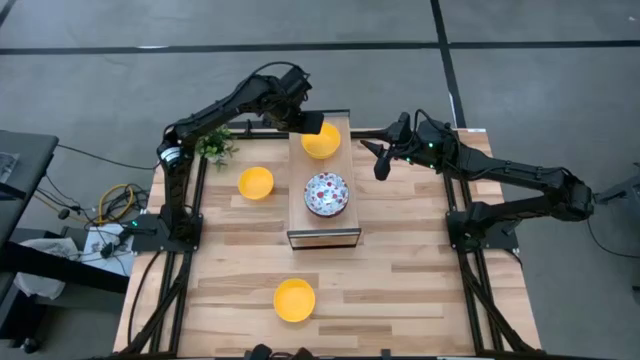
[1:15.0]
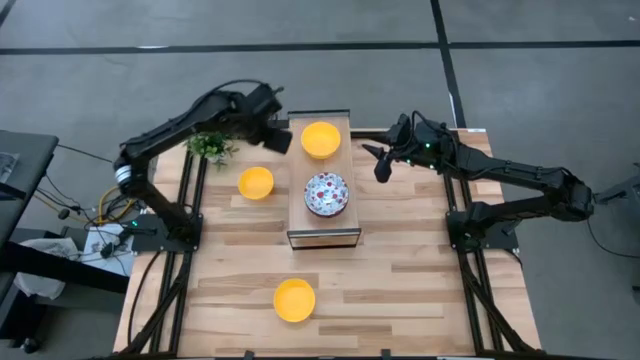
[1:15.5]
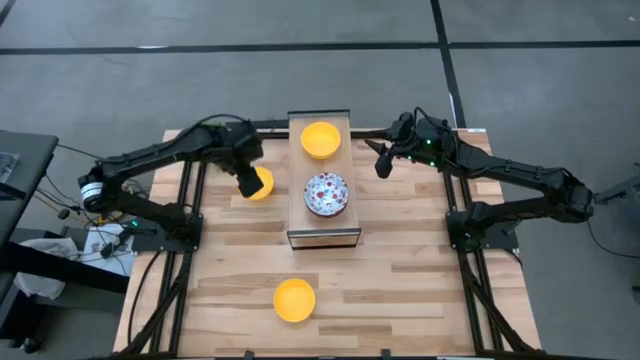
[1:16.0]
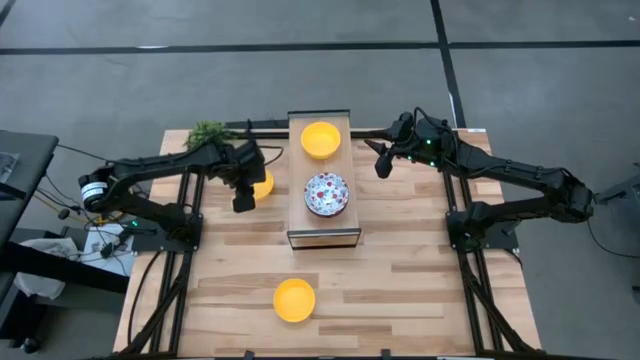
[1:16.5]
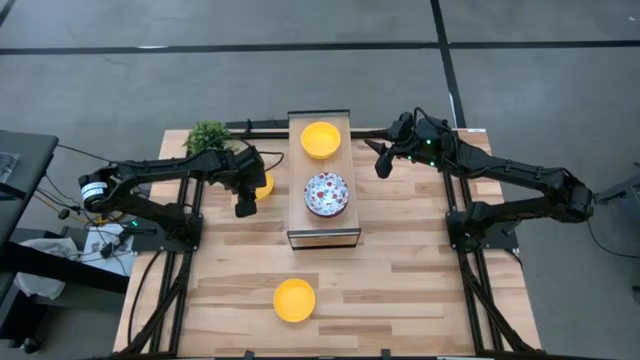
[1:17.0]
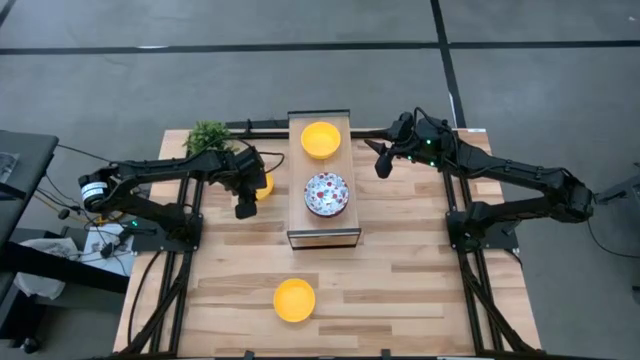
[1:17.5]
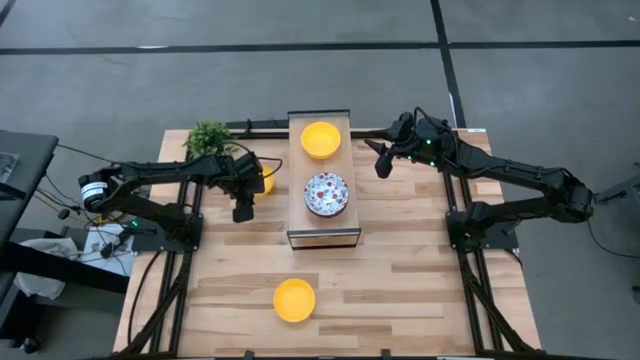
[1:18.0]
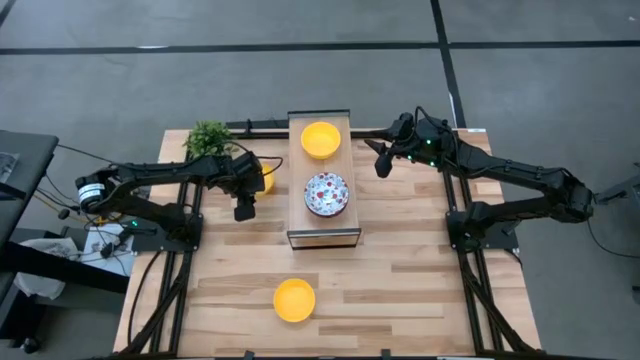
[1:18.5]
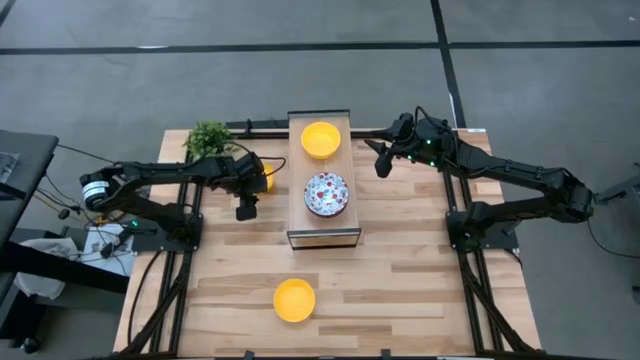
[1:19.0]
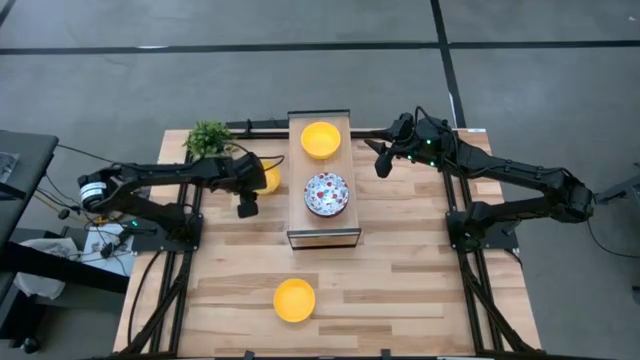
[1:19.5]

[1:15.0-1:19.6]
Task: Pick & Place Mini bowls
Stack the yellow bowl on top of the yellow bowl on the shelf

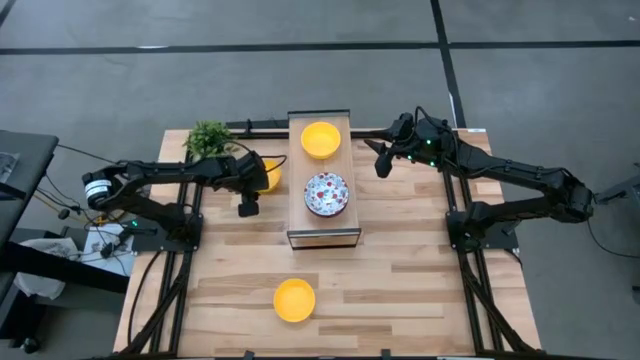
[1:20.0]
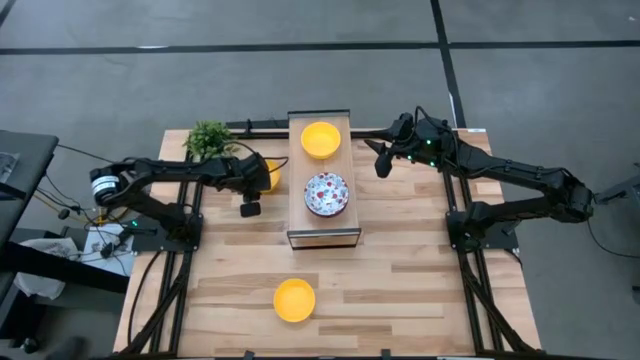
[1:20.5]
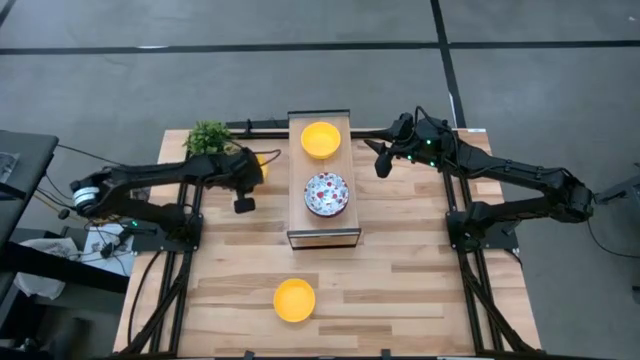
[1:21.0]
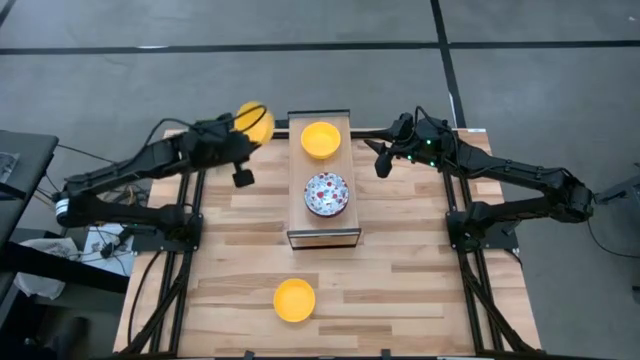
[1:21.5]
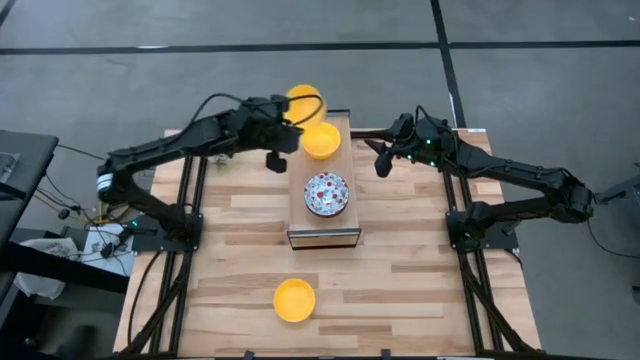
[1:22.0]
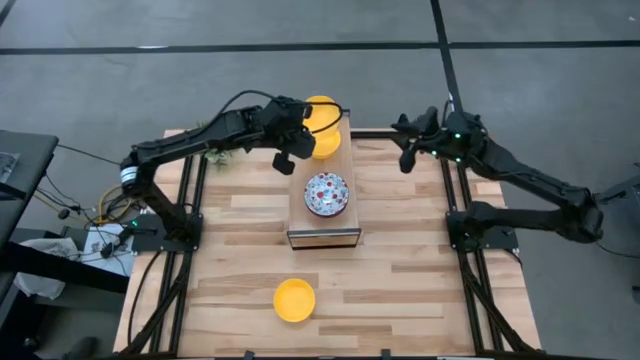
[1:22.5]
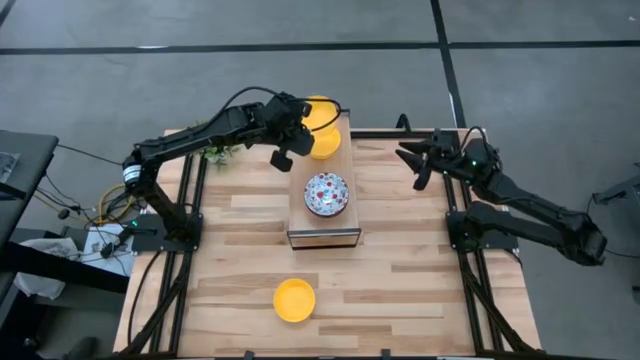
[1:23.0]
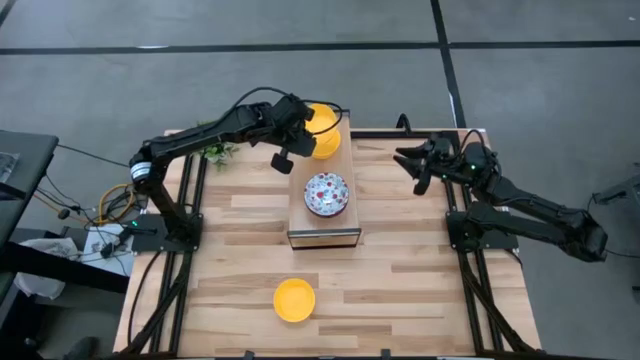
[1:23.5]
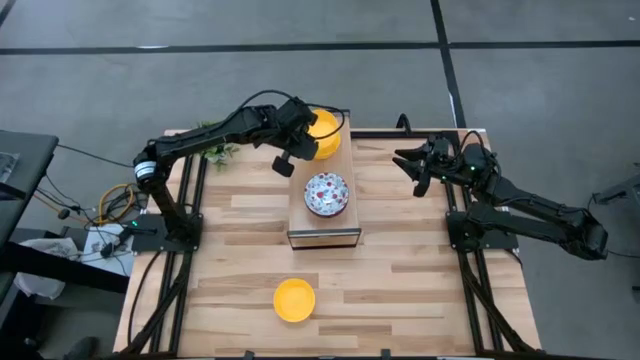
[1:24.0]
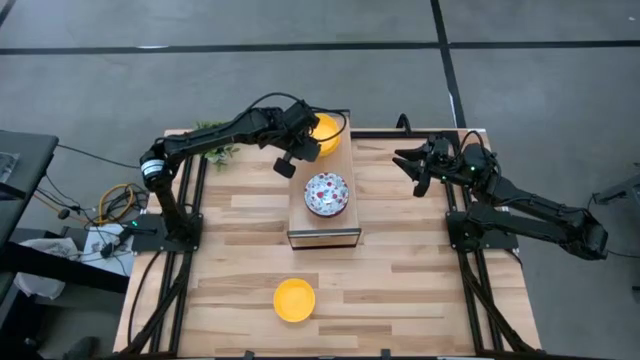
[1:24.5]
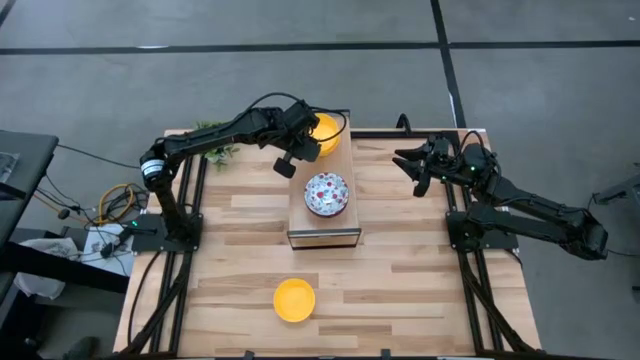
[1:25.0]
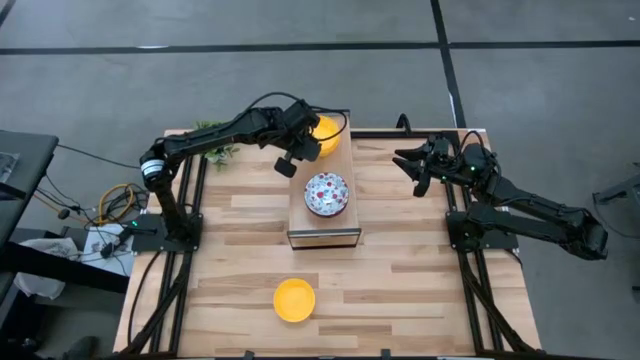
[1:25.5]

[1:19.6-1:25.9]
Stack the yellow bowl on top of the yellow bowl on the shelf

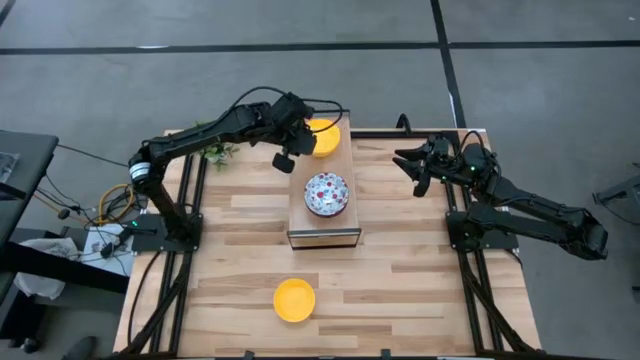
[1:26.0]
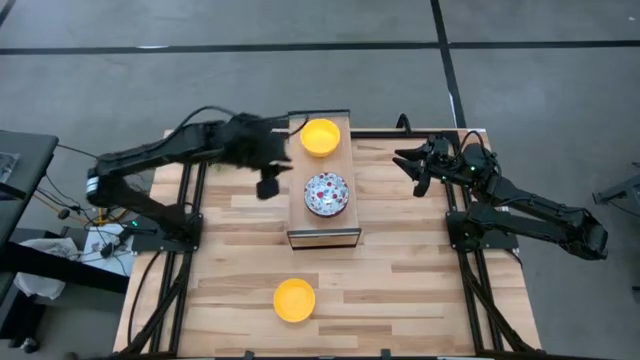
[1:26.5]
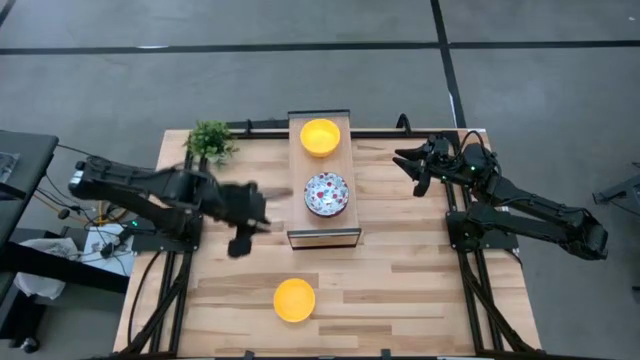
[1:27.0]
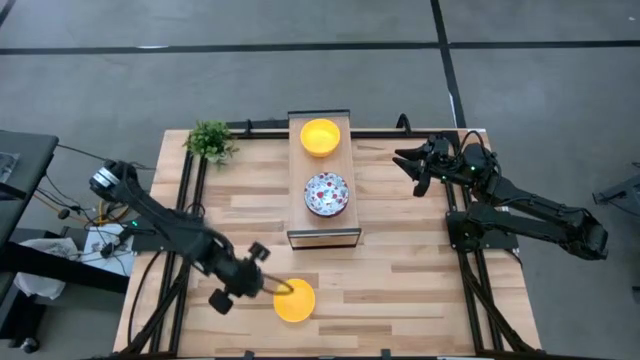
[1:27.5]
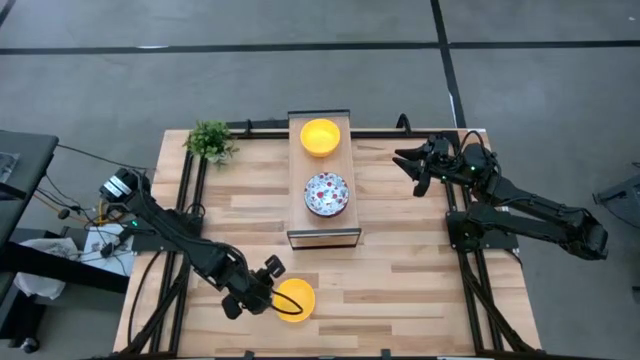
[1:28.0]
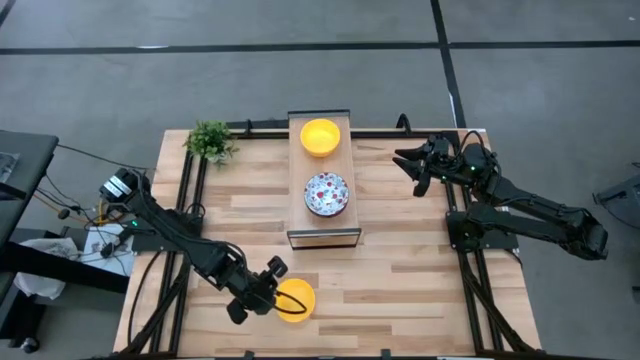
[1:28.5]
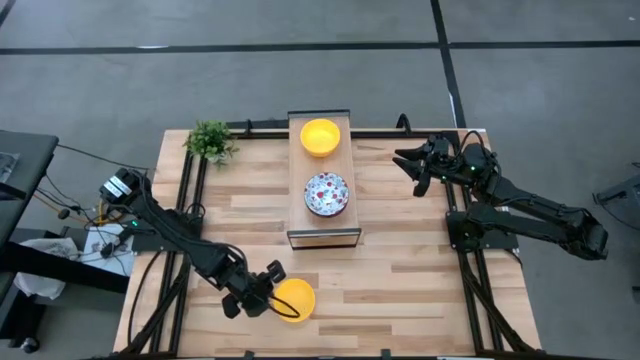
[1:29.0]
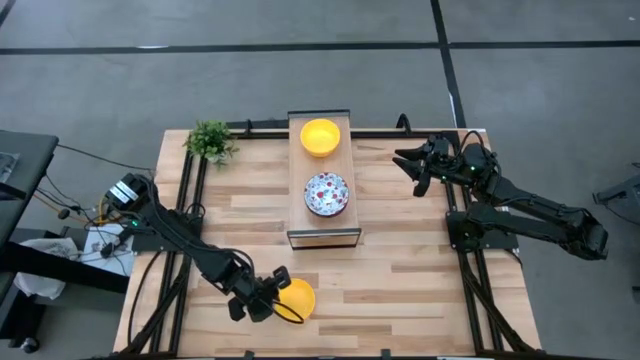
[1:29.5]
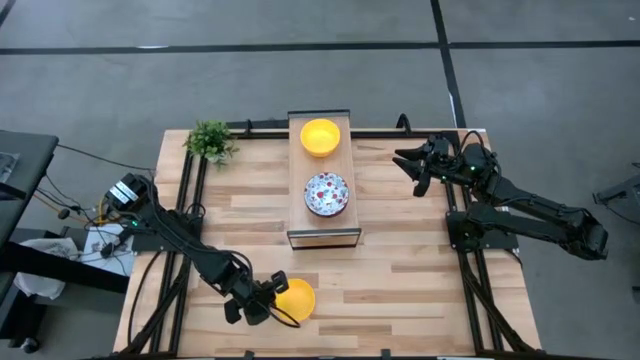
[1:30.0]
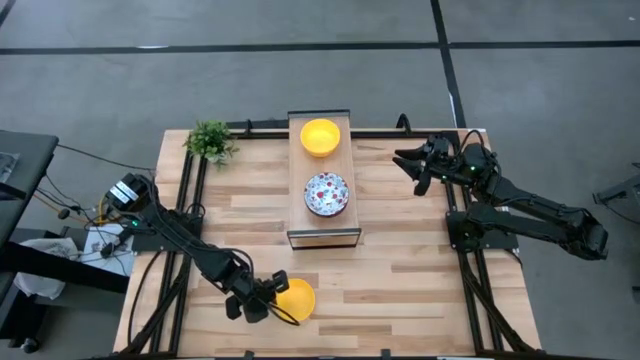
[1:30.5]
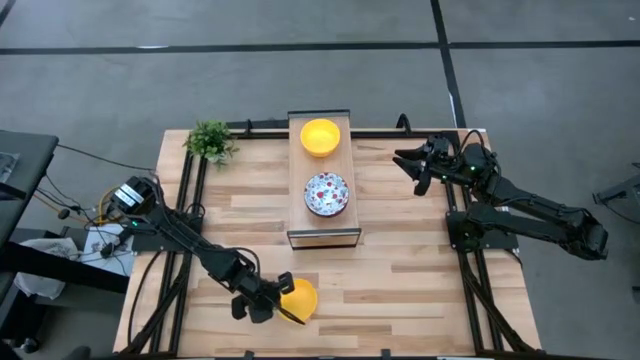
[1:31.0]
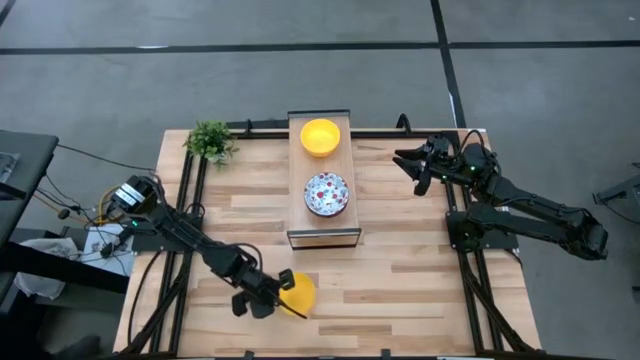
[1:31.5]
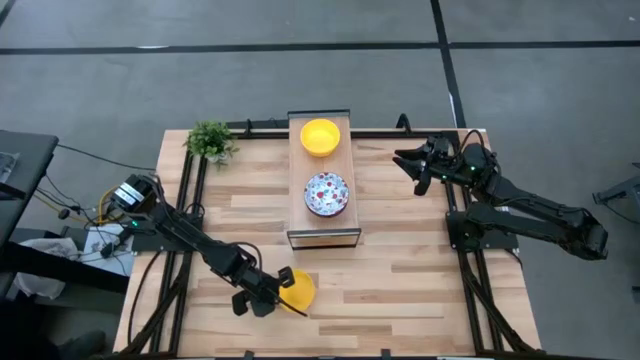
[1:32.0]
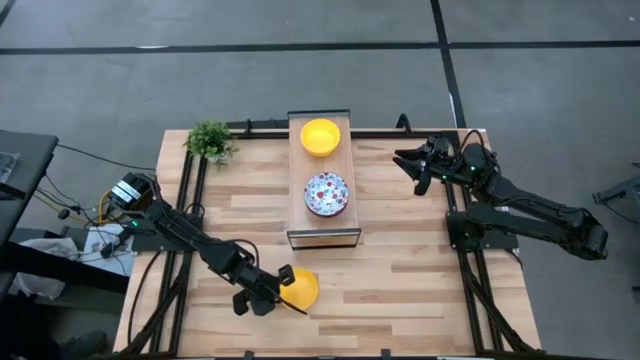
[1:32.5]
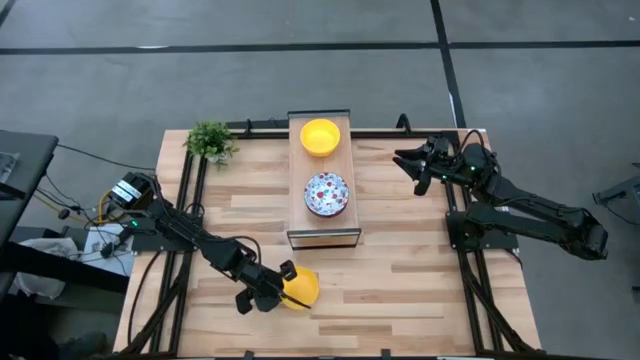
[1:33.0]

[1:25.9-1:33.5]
Stack the yellow bowl on top of the yellow bowl on the shelf

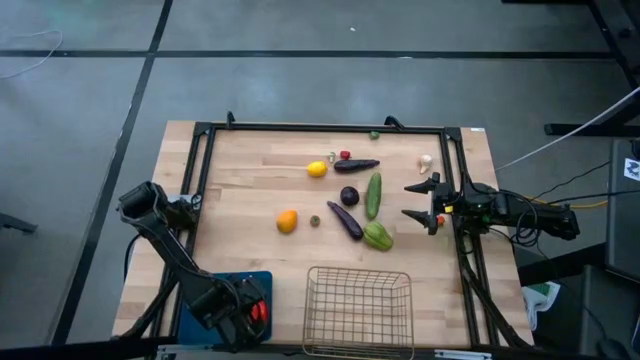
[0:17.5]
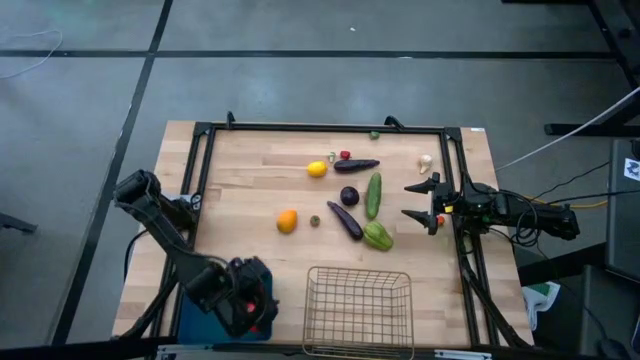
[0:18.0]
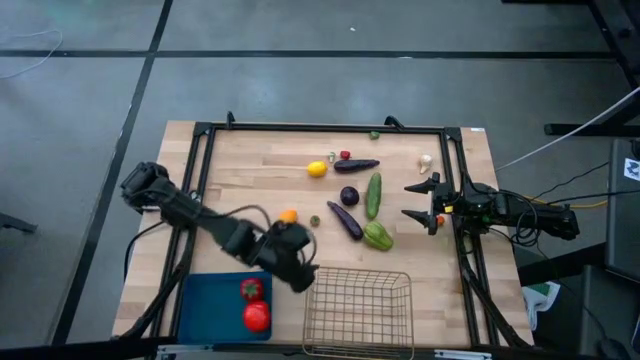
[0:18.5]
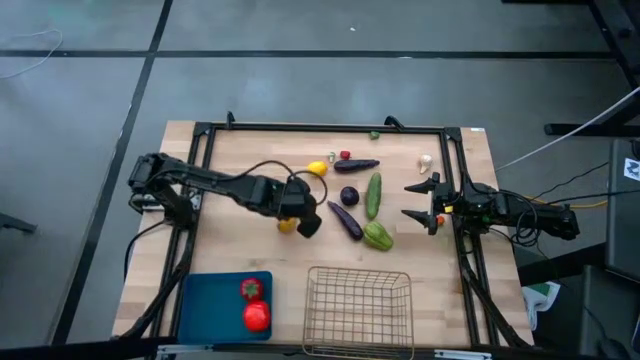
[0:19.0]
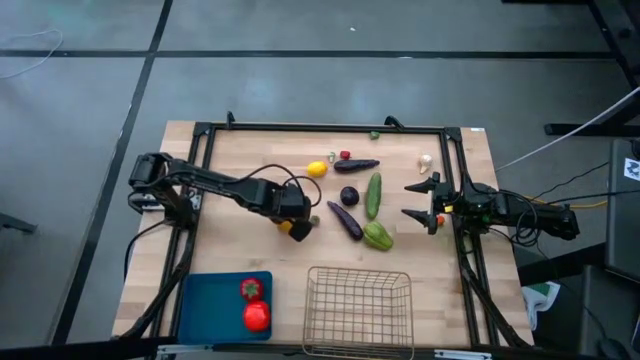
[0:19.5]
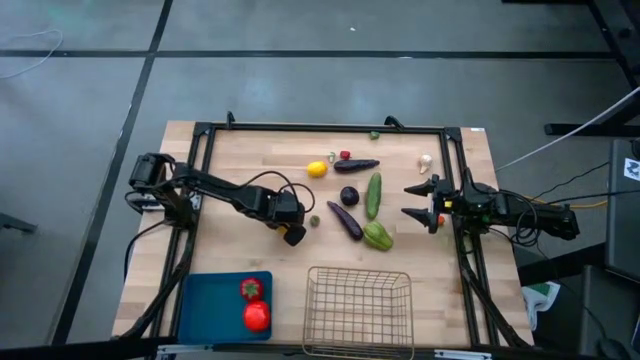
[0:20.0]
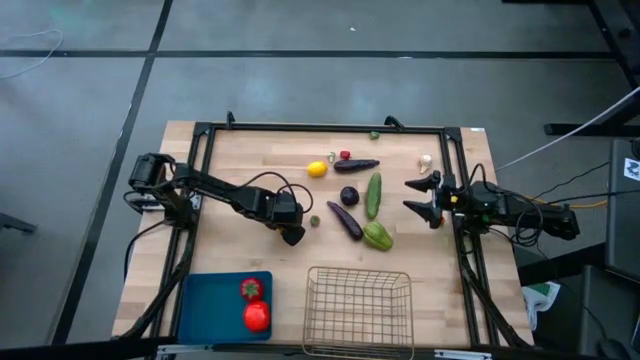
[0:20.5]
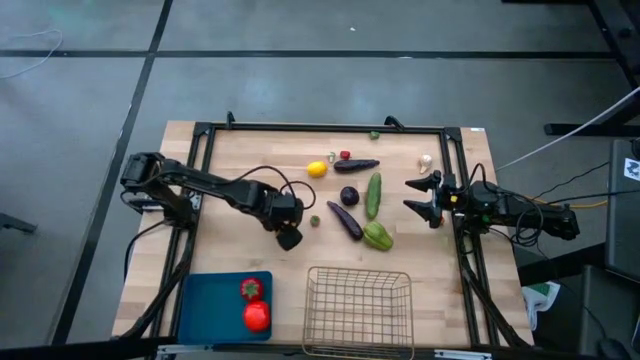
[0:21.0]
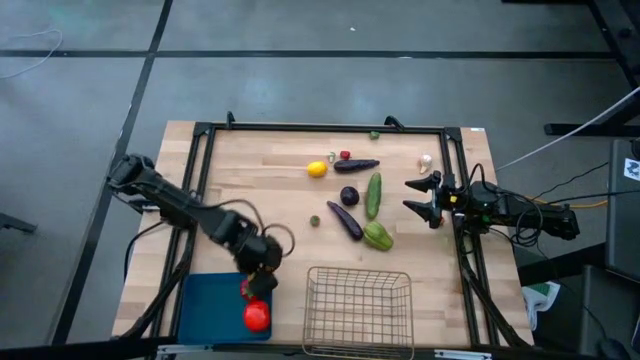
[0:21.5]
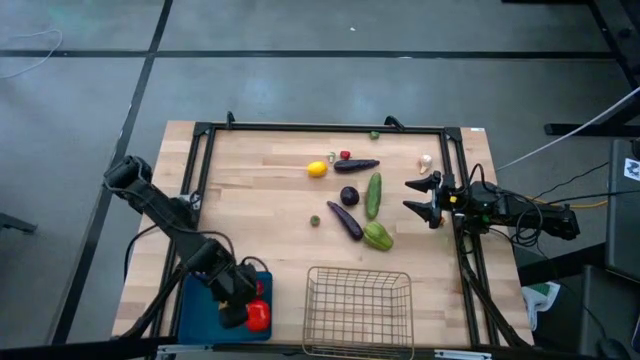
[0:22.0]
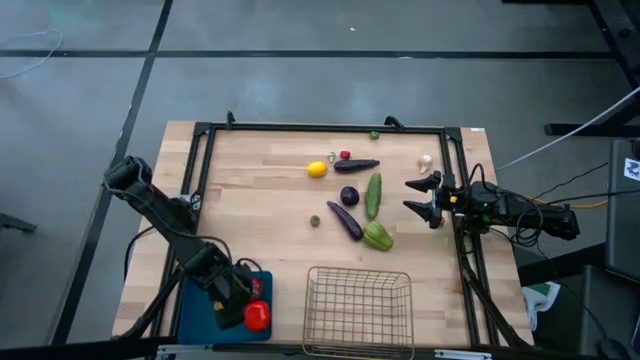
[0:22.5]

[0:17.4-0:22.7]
Task: Sort produce into baskets
Put the lemon into the blue bin
